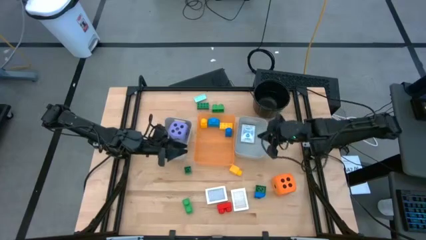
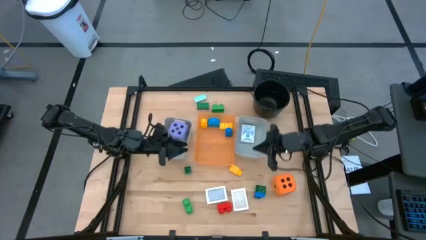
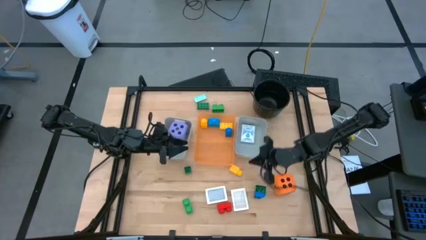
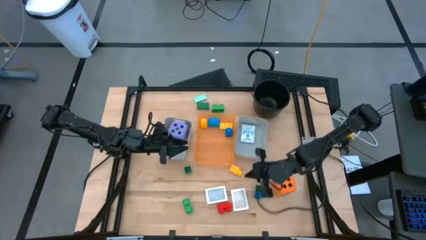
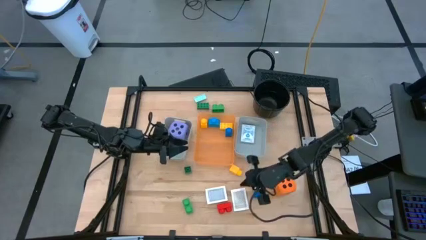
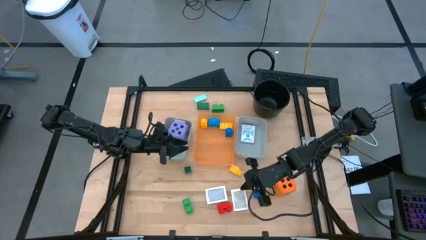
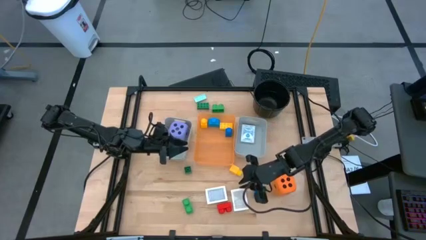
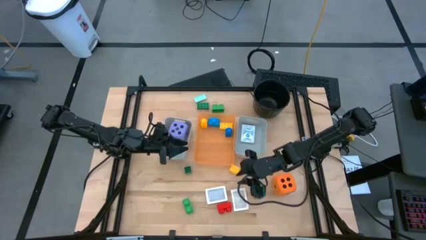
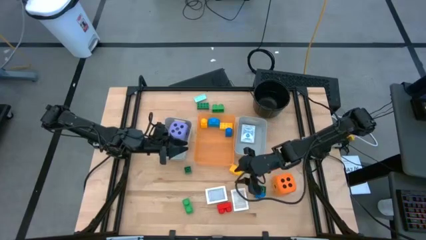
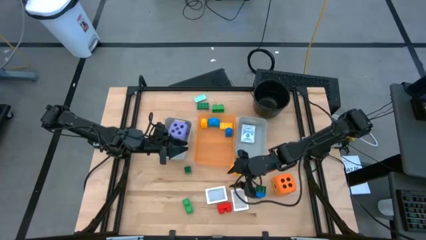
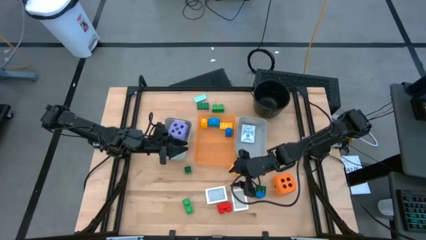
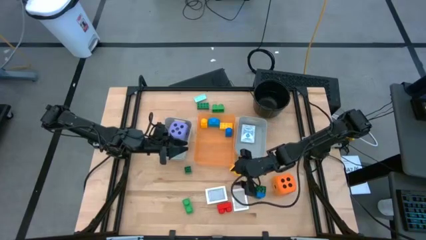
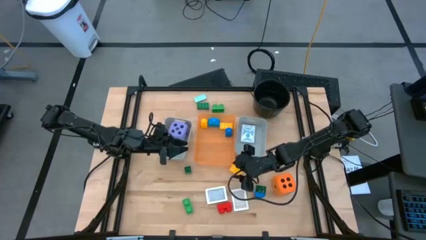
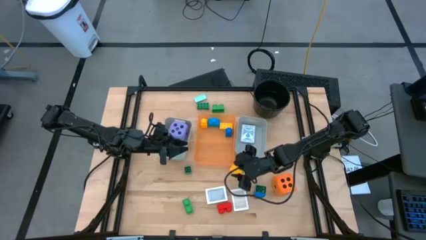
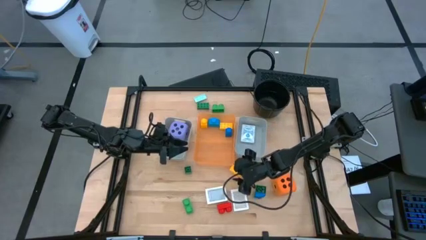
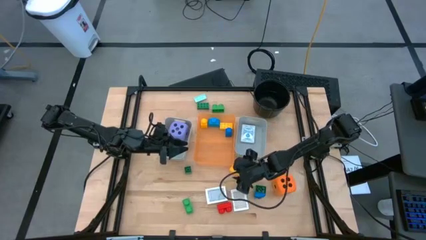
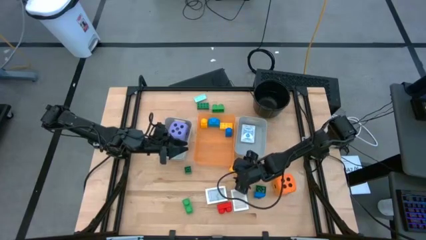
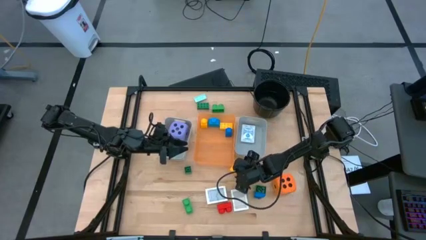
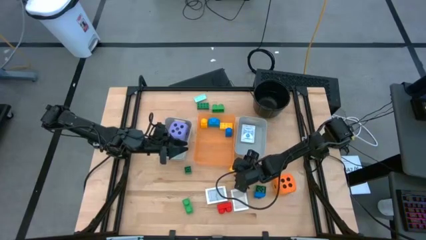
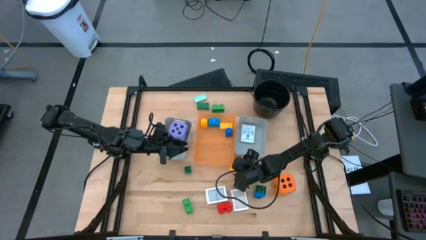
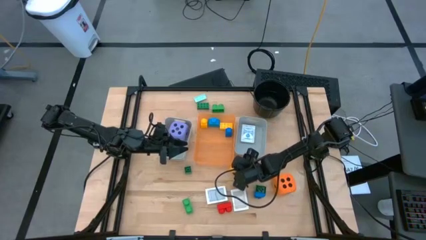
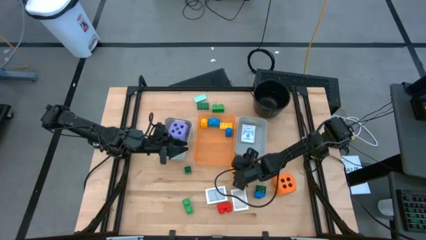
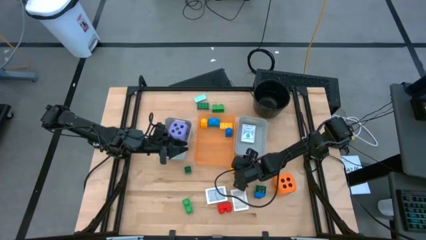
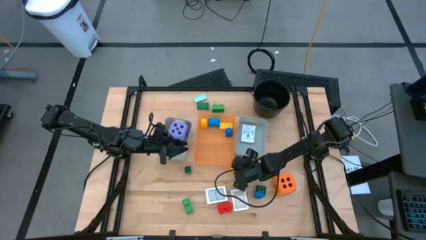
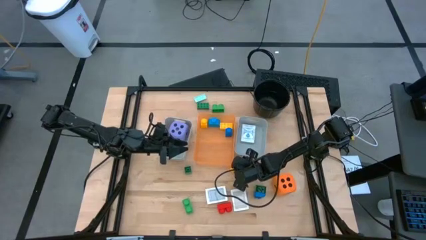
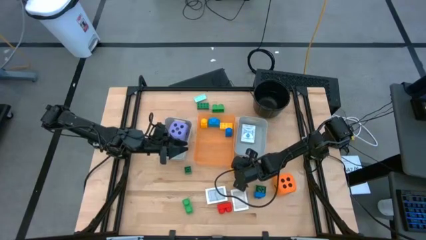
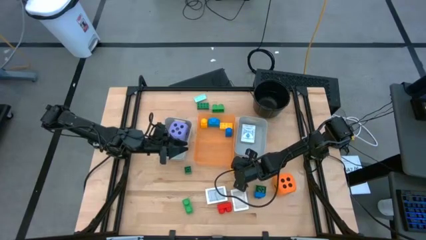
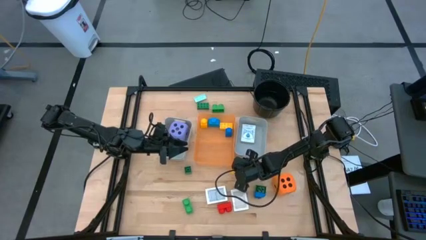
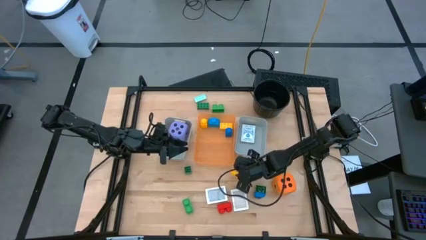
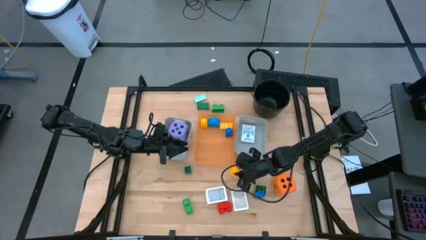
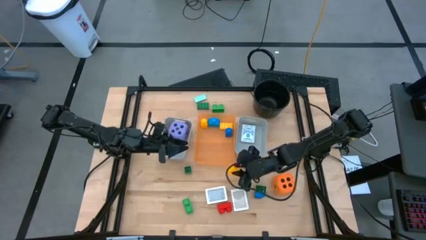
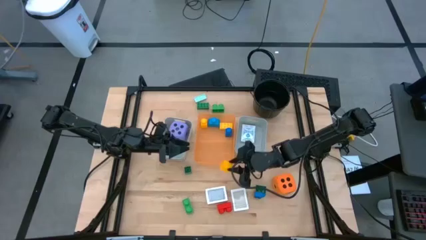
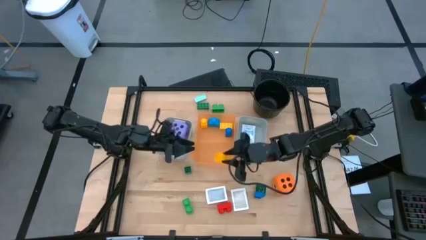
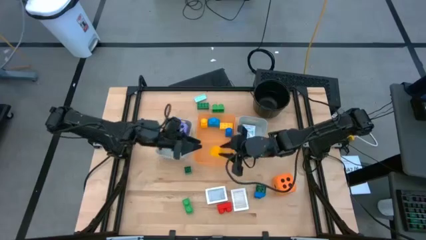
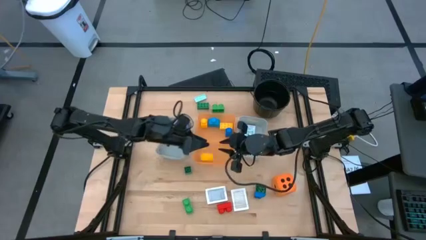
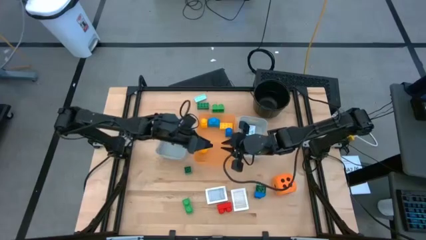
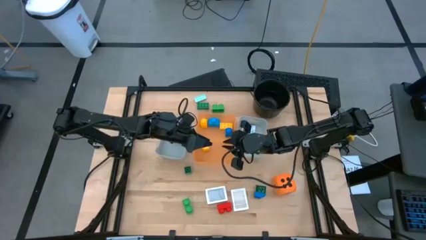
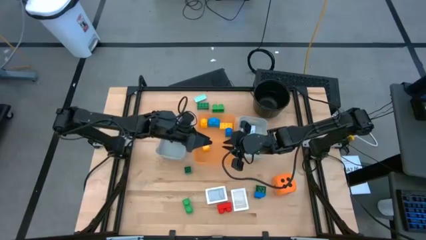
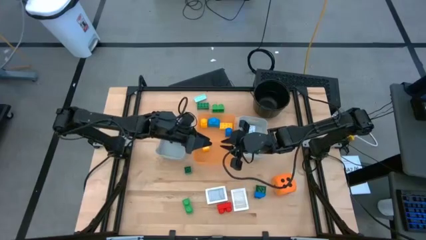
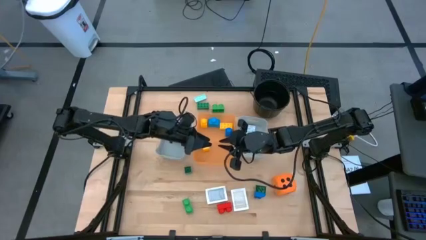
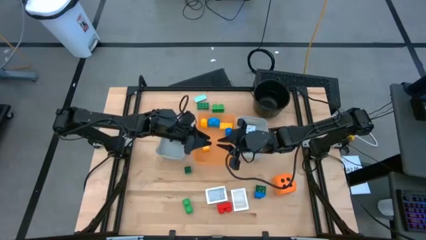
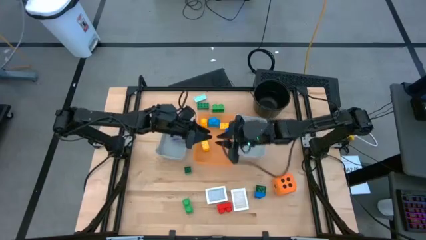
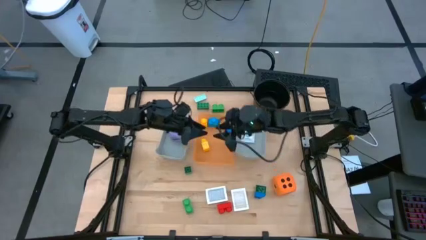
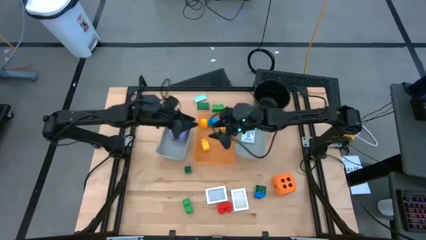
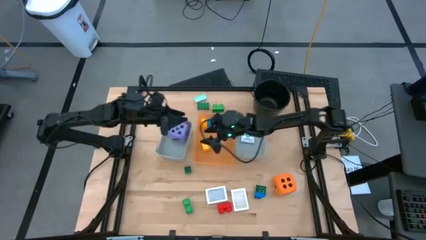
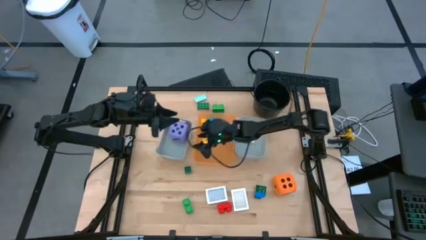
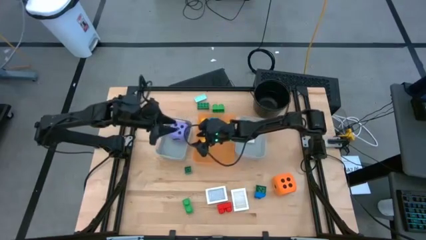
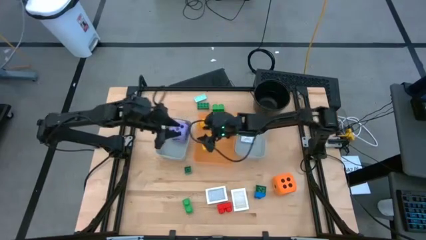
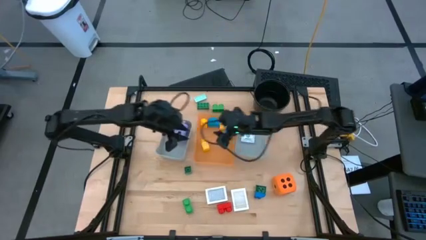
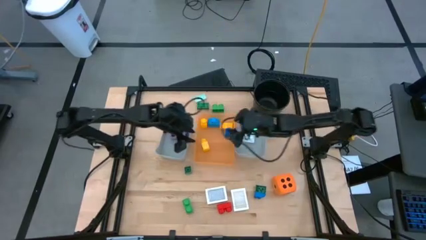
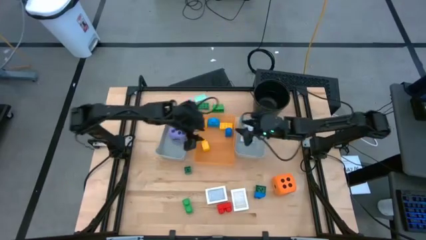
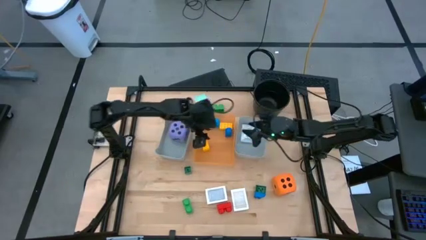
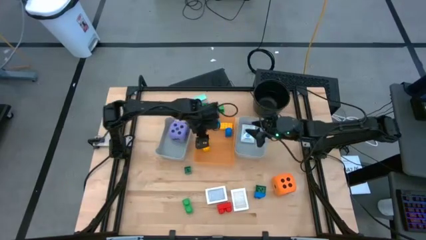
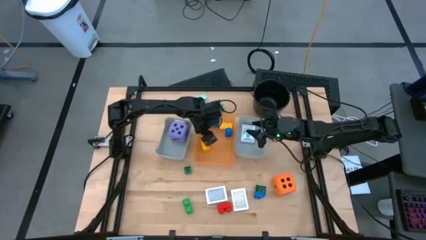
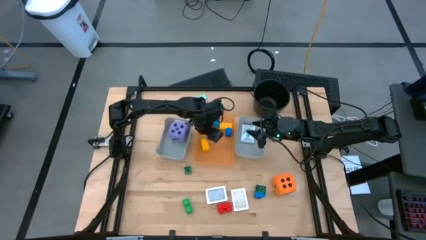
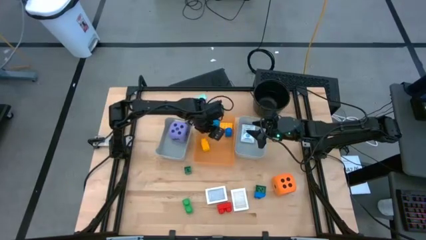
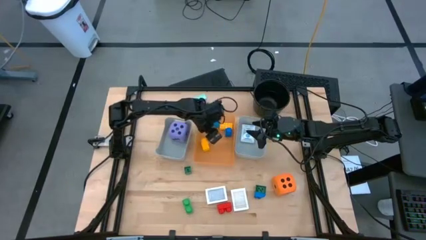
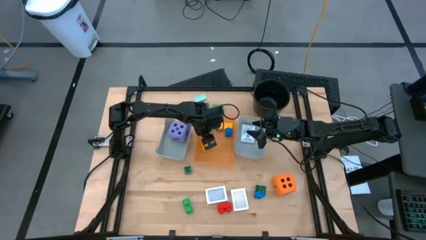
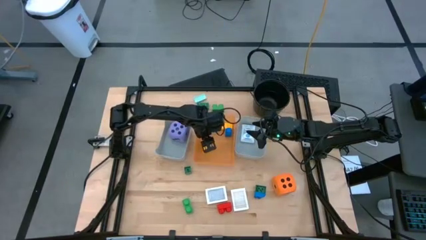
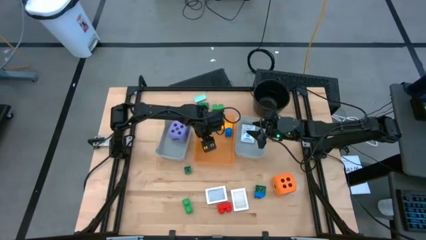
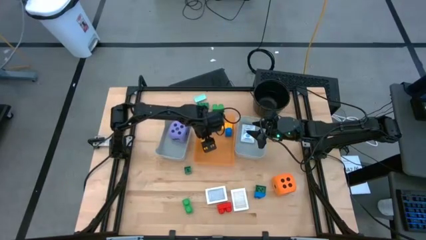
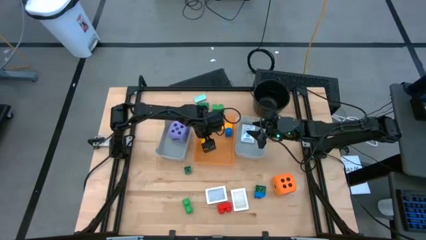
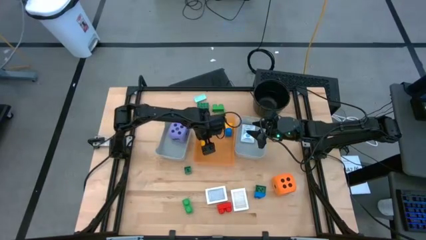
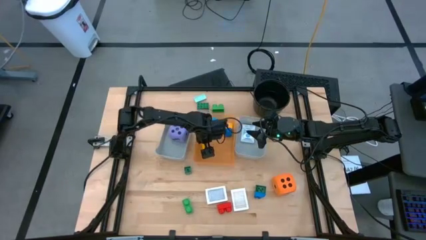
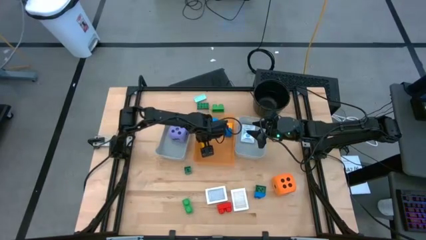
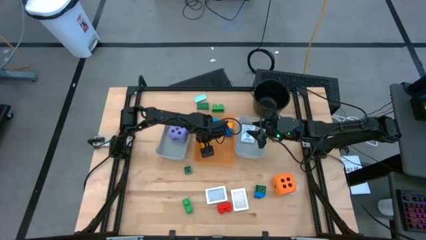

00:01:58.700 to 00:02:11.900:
Task: Pick & Place Toys
Put the yellow game piece into the orange bin

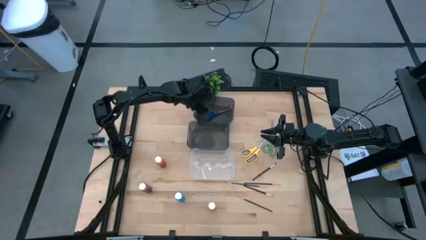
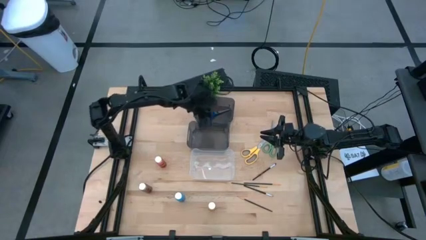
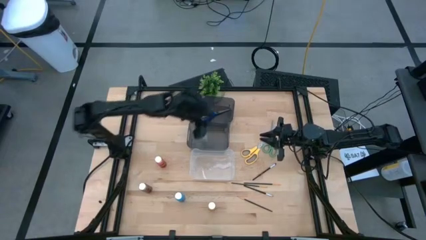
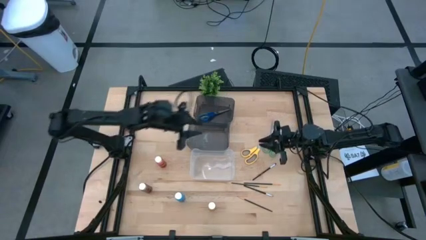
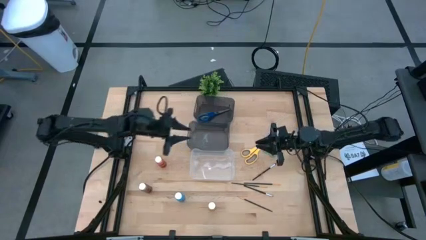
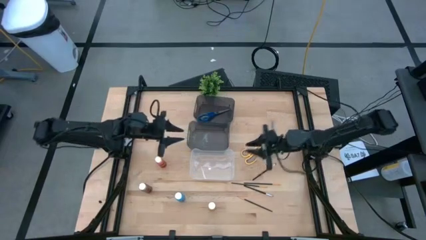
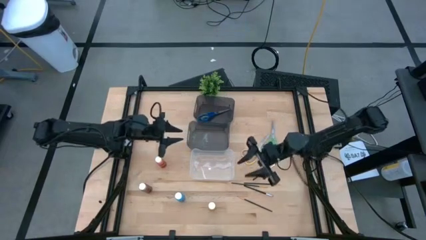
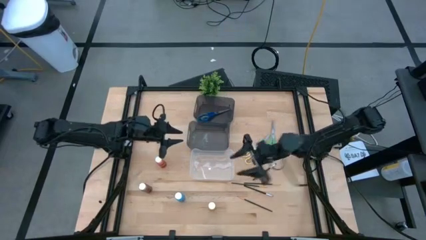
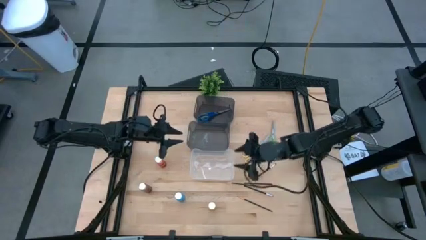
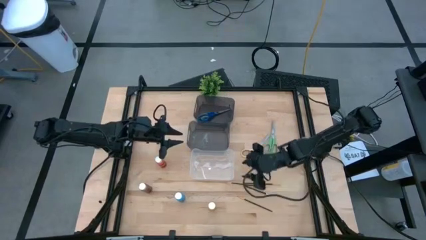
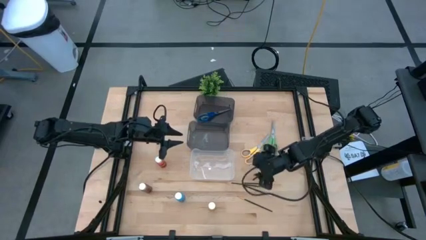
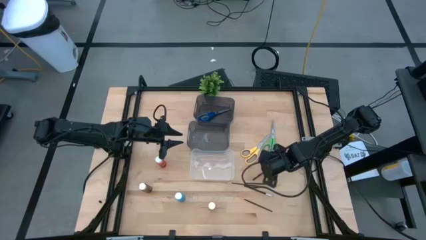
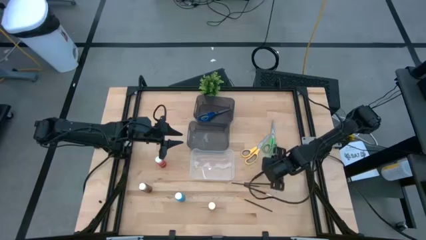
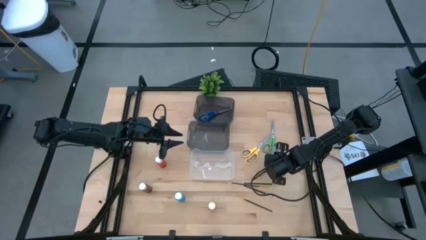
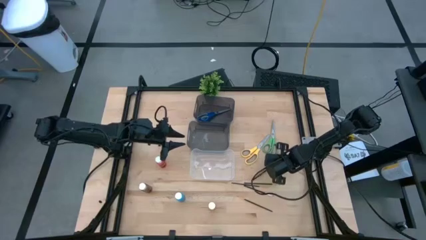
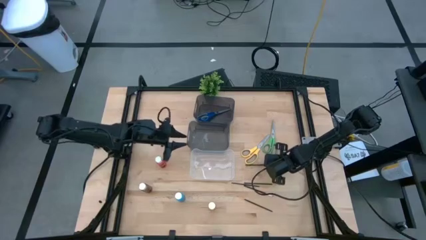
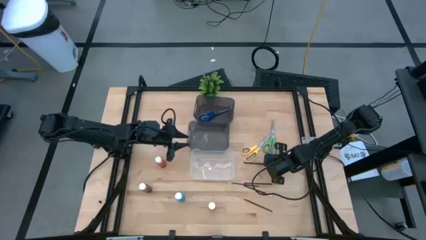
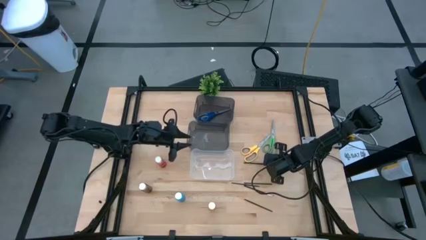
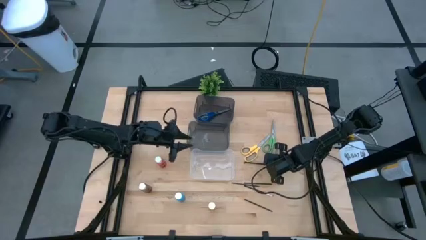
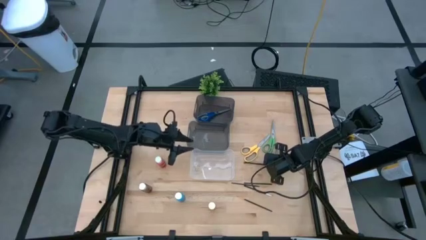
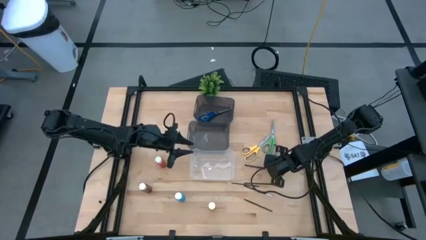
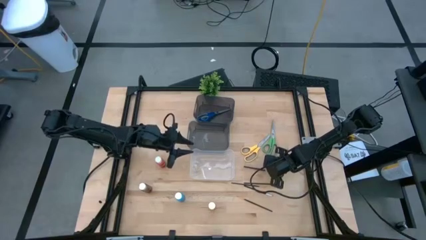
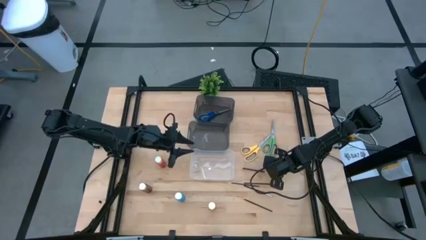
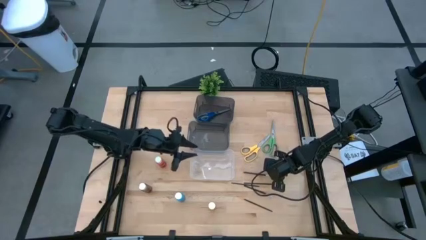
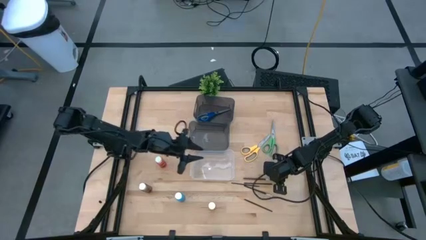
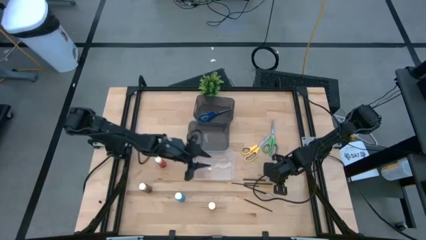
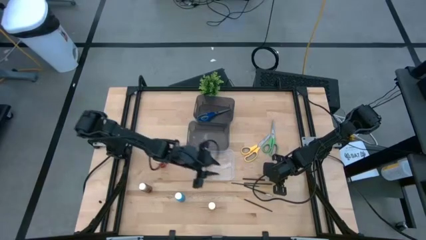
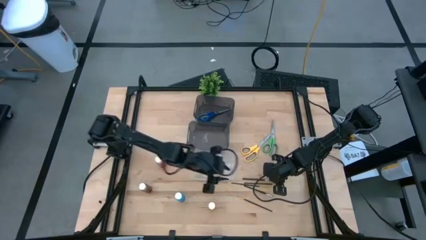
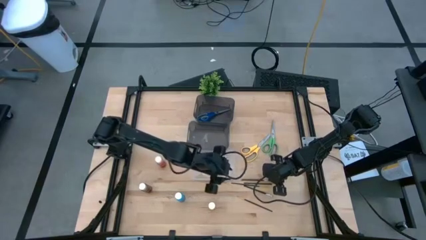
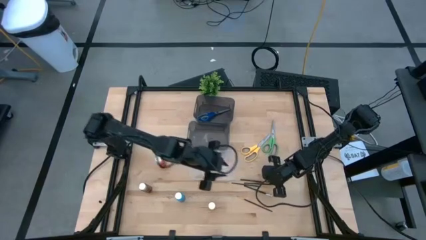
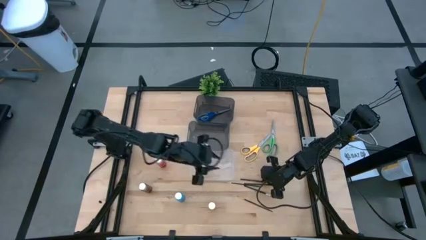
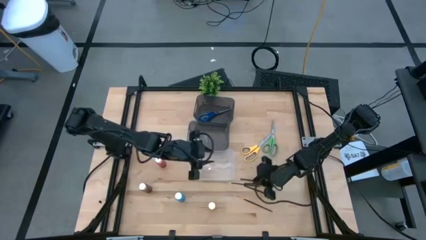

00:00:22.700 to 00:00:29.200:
Task: Pick & Place Paint Supplies
Put the silver paintbrush into the bottom black bin
